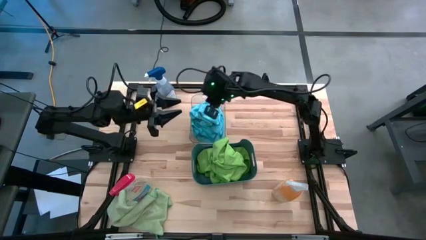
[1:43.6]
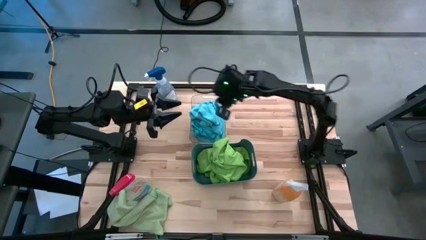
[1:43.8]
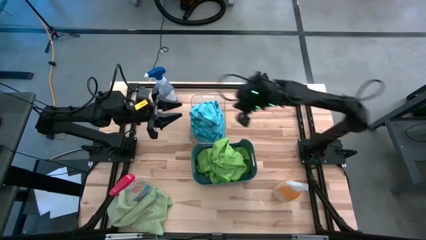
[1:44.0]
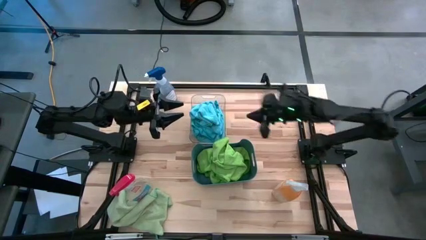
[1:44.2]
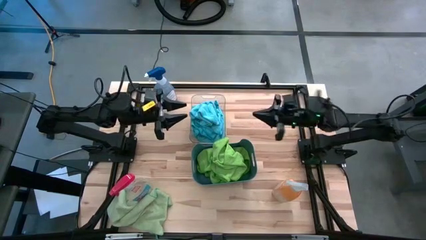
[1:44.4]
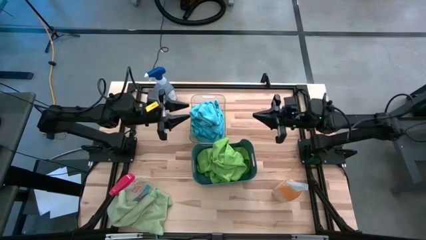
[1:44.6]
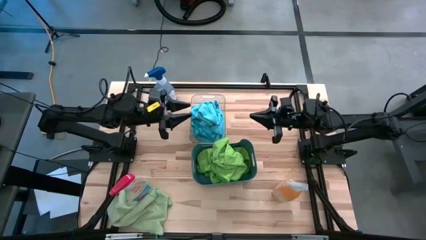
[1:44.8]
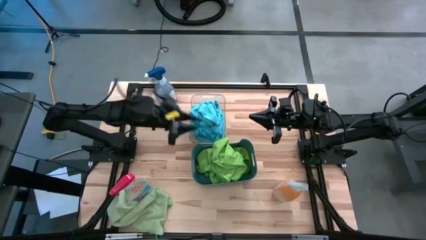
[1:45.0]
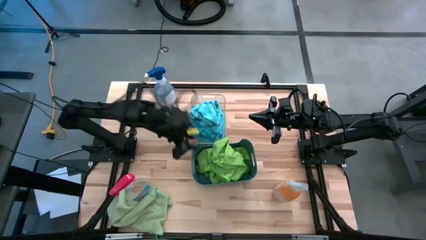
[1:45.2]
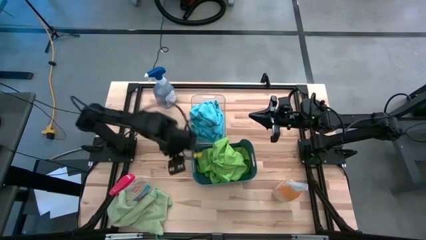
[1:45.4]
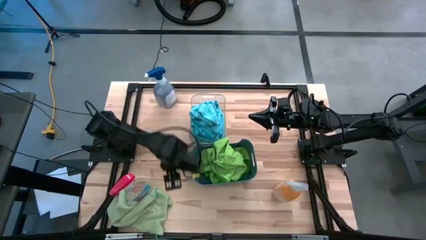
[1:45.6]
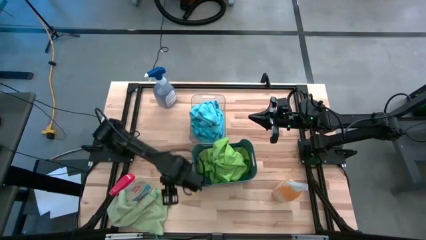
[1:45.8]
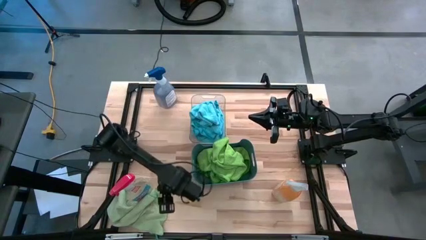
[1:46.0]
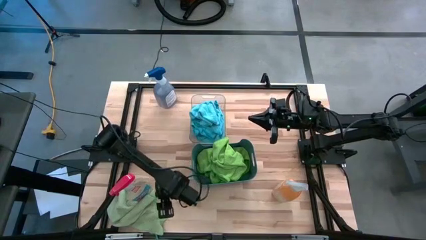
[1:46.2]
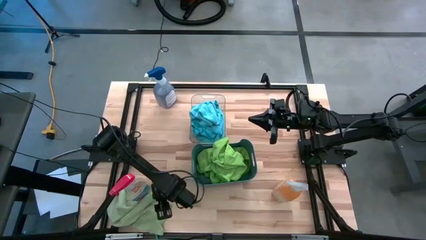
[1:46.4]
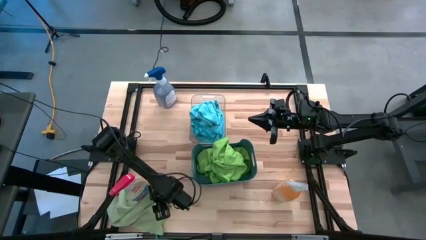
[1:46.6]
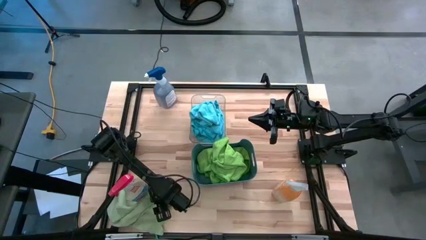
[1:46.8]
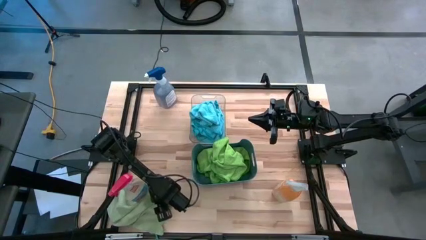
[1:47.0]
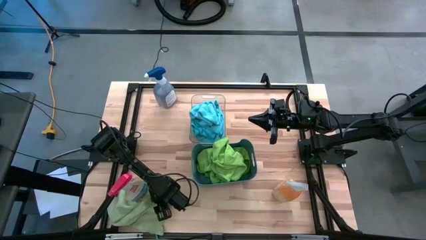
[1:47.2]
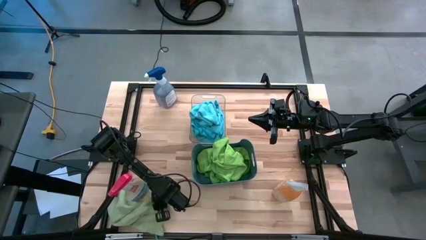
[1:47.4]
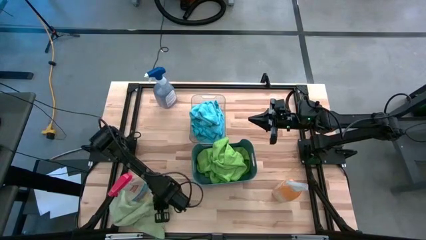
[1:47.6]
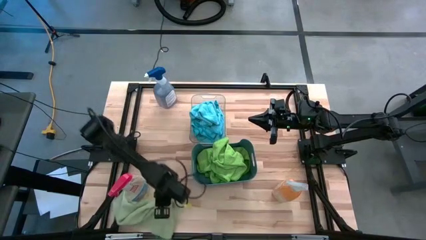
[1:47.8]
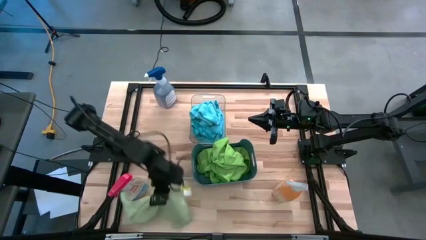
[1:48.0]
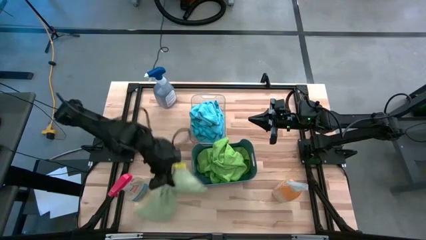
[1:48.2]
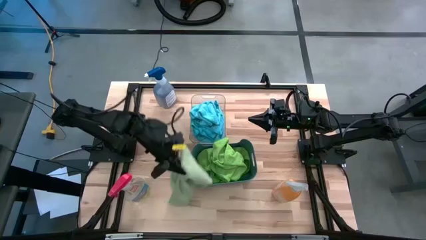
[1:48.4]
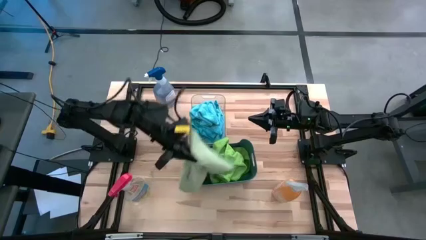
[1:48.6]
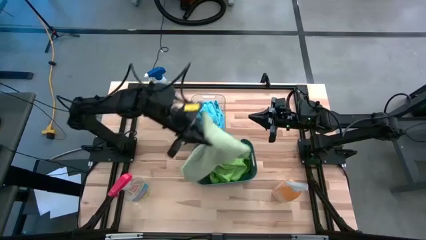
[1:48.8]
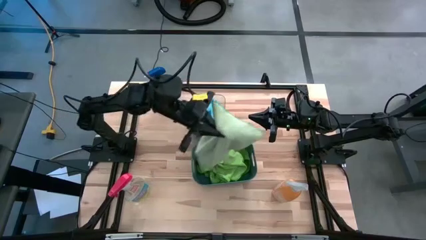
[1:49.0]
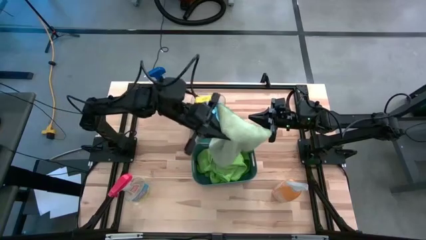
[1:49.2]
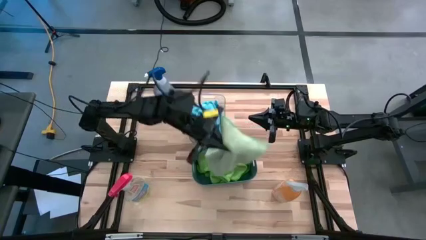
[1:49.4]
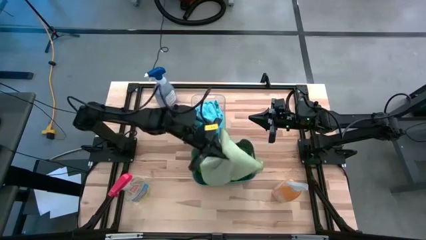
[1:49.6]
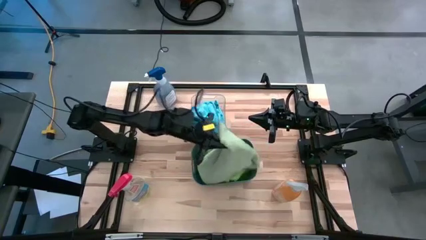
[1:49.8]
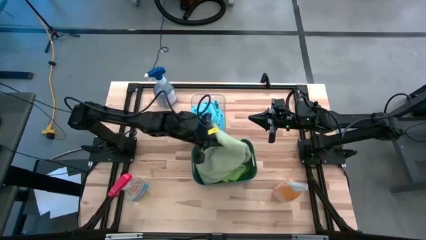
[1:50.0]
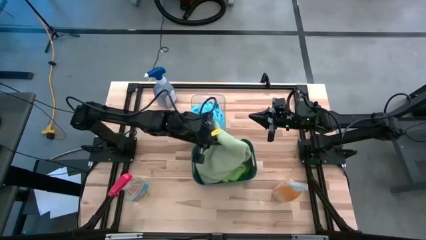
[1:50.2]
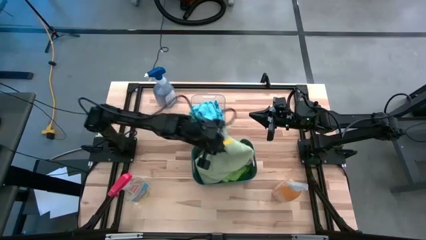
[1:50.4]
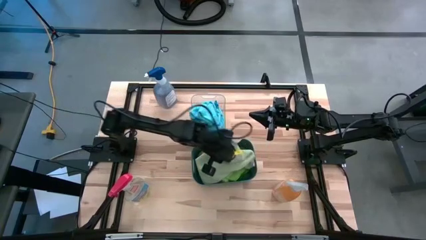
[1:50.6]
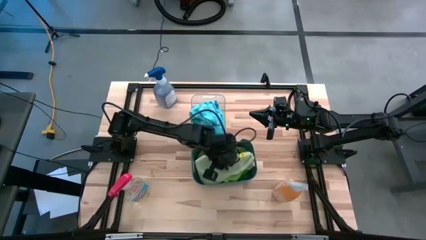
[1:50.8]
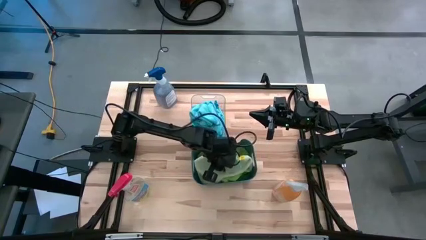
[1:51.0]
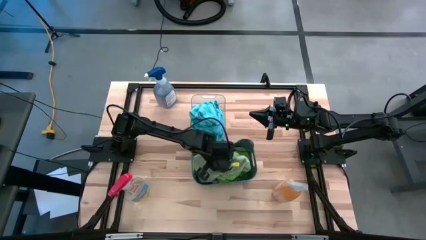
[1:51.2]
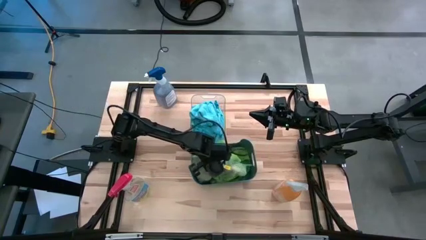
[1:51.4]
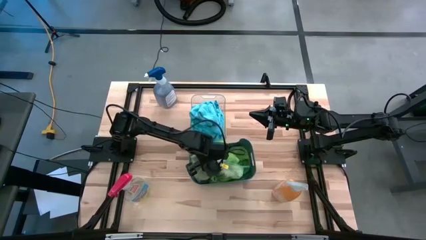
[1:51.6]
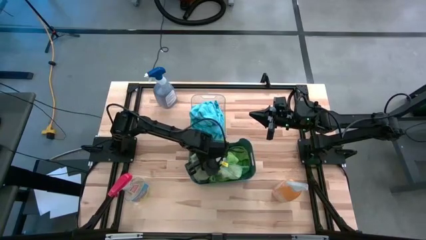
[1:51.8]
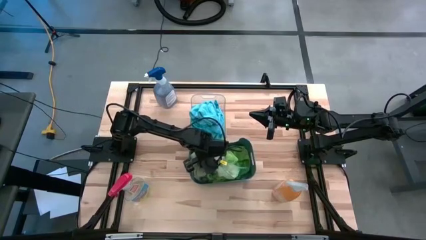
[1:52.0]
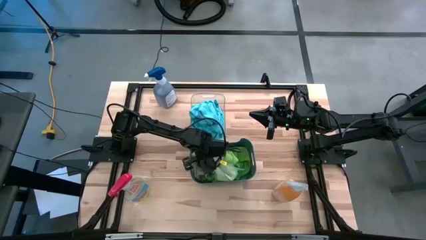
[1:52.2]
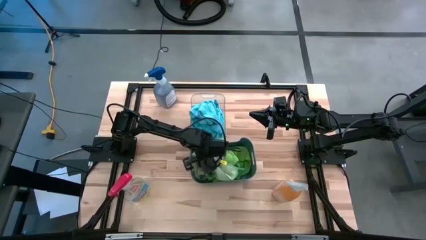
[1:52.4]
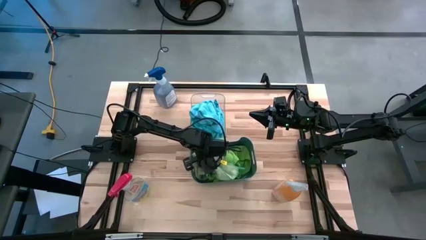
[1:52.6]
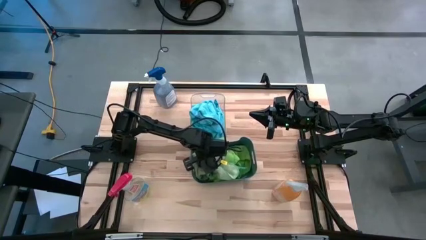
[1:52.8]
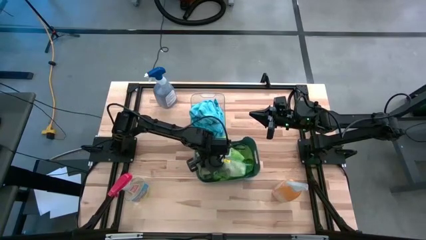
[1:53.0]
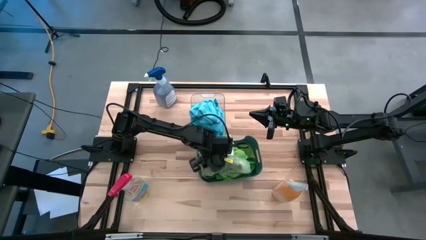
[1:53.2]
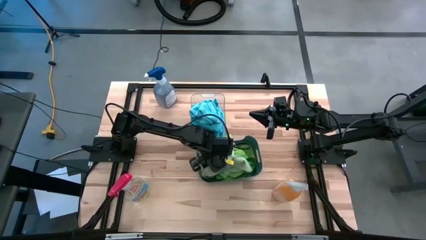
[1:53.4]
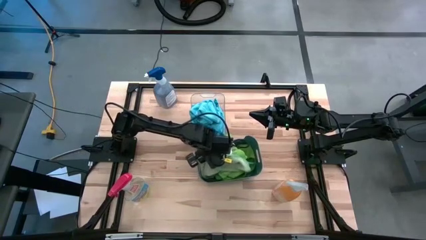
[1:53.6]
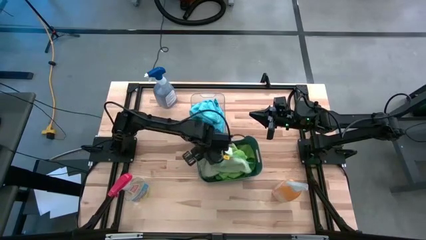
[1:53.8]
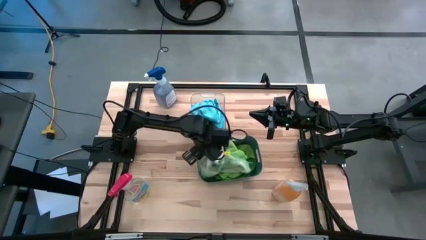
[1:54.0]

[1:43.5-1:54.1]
Task: Sort microfiber towel by color & place in baskets
Put the green microfiber towel into the blue bin

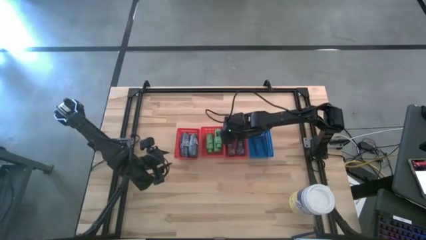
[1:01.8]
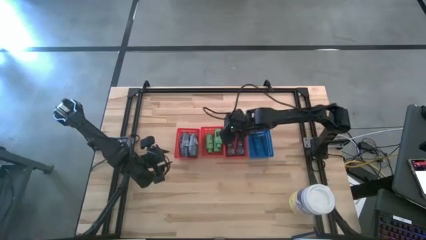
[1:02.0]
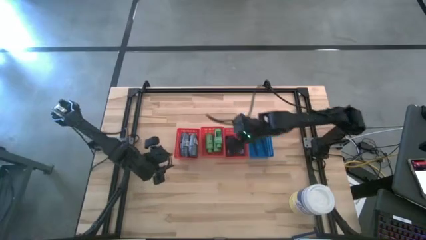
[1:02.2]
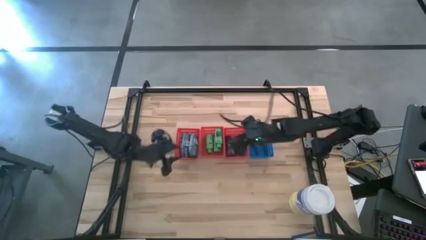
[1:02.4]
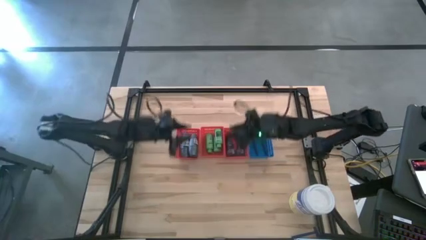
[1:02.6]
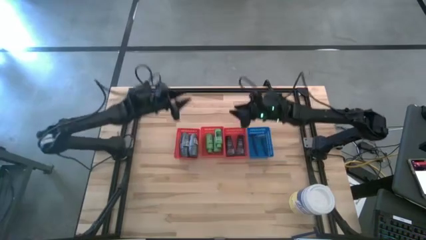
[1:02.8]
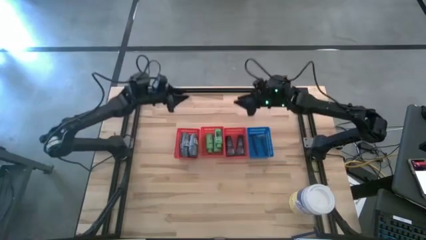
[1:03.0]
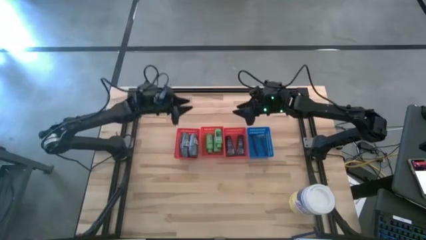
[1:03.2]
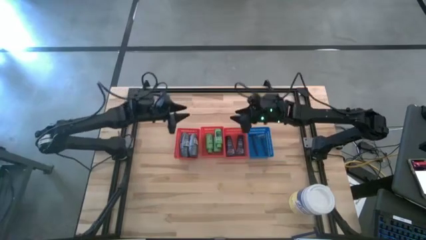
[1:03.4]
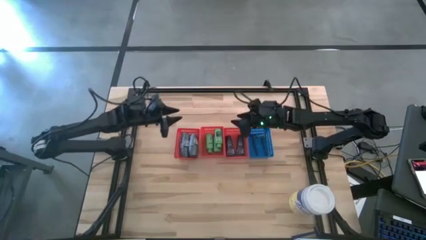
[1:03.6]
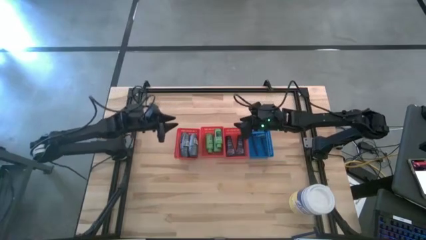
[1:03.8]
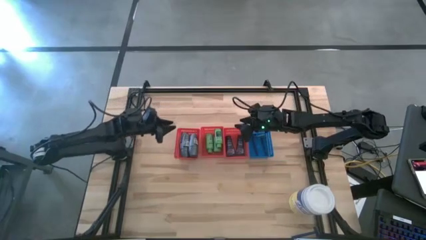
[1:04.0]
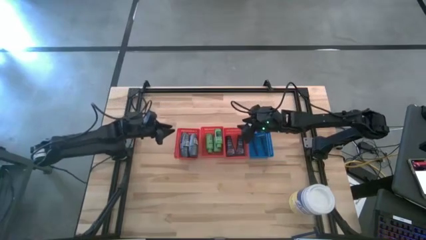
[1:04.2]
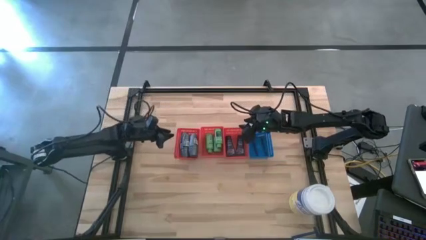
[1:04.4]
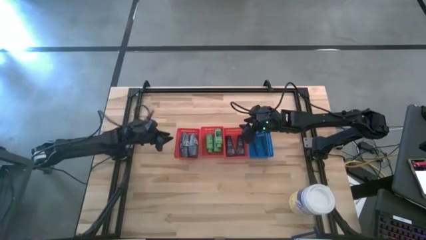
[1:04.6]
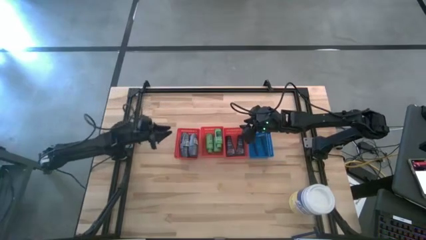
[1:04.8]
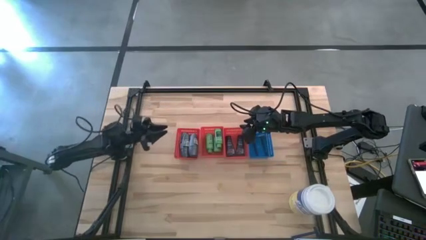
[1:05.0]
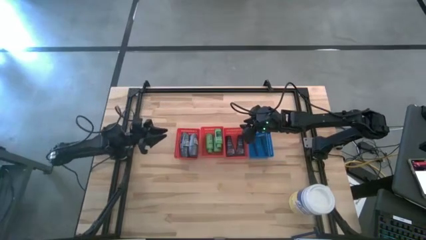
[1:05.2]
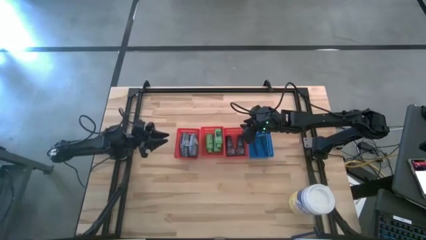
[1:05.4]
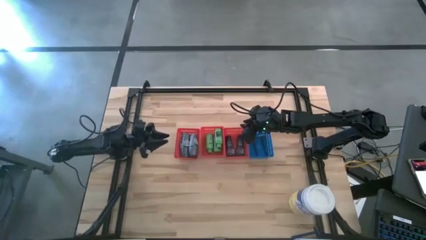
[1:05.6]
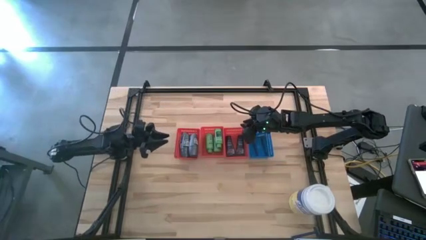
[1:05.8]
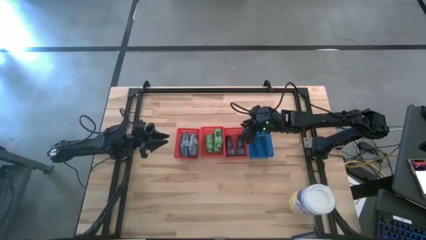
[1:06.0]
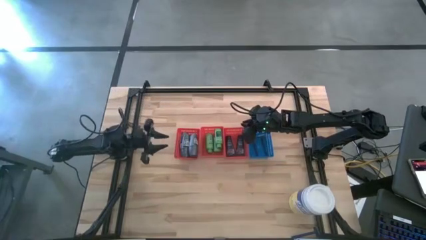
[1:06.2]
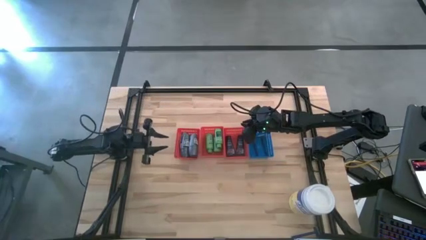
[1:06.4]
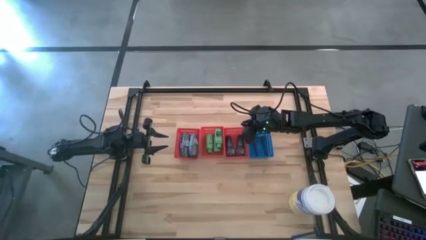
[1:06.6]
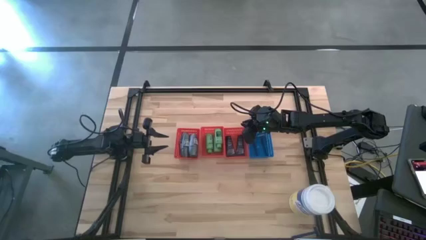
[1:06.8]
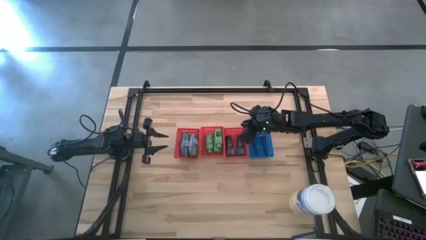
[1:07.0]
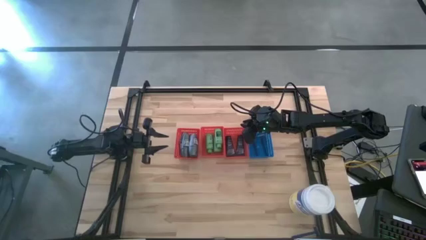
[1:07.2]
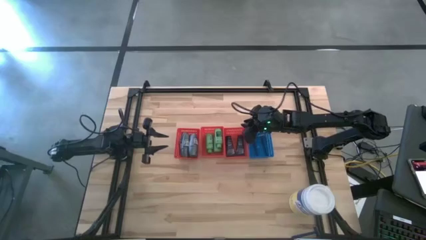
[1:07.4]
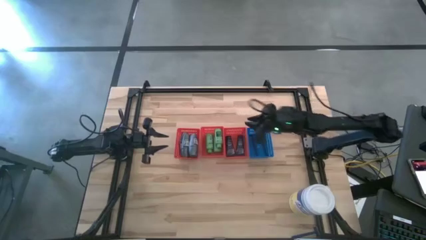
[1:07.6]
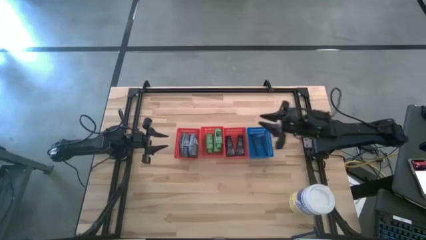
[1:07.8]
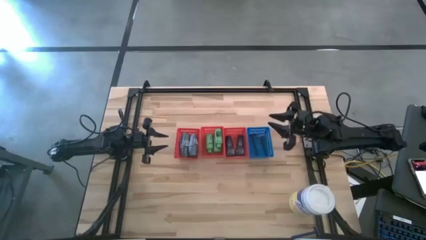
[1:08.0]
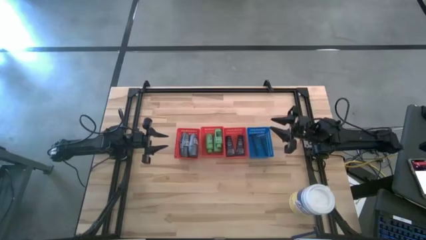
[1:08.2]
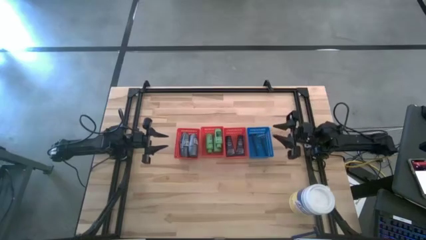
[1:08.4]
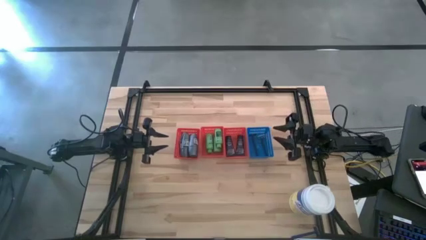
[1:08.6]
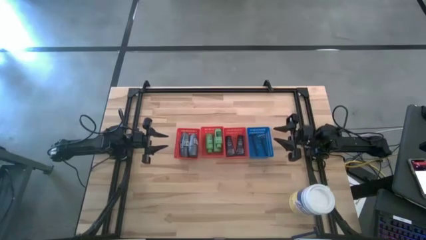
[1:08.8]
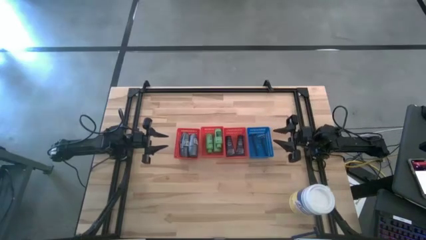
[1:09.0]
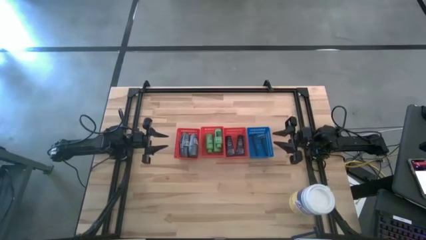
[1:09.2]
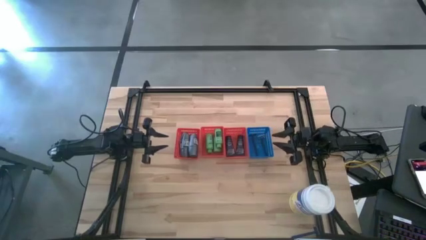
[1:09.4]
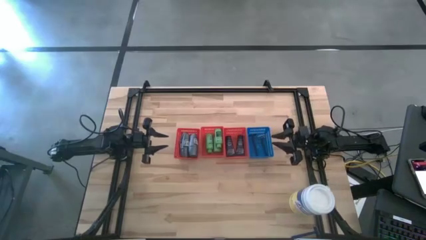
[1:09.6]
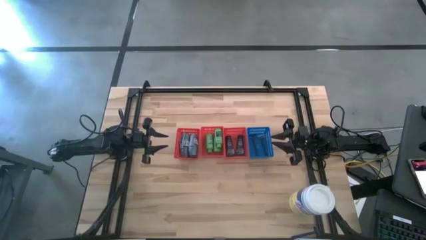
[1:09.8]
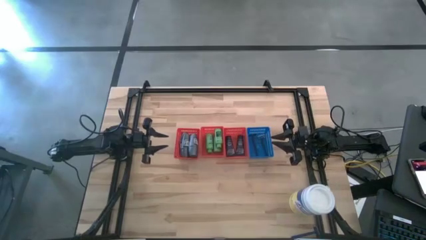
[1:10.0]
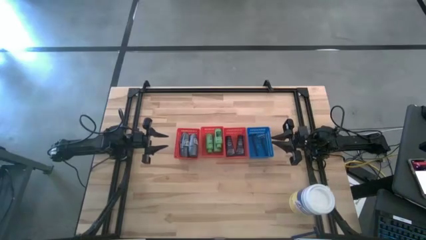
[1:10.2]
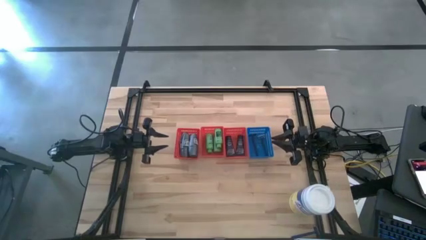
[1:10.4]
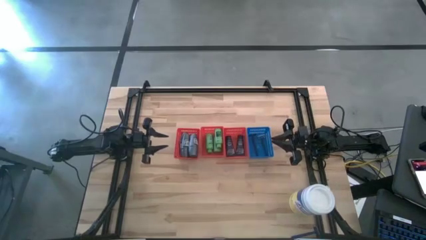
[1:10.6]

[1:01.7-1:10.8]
Task: Pick & Place Travel size toiletries
Return to Home Position
